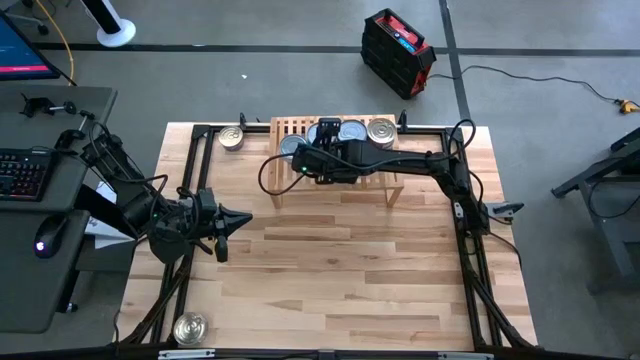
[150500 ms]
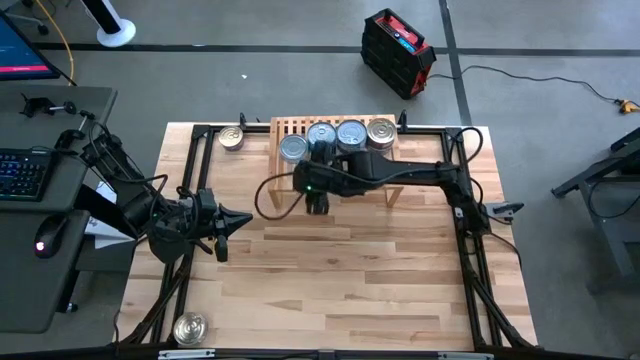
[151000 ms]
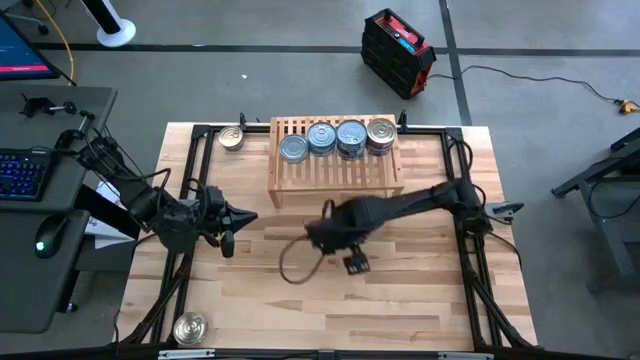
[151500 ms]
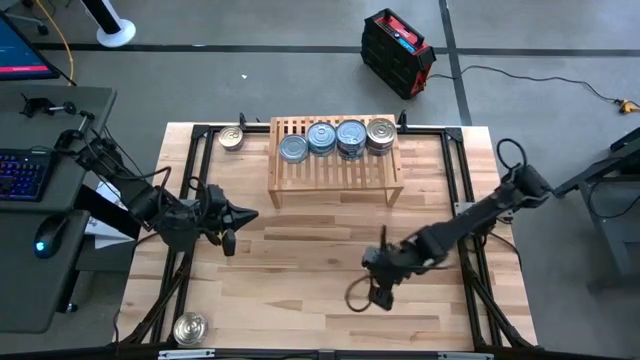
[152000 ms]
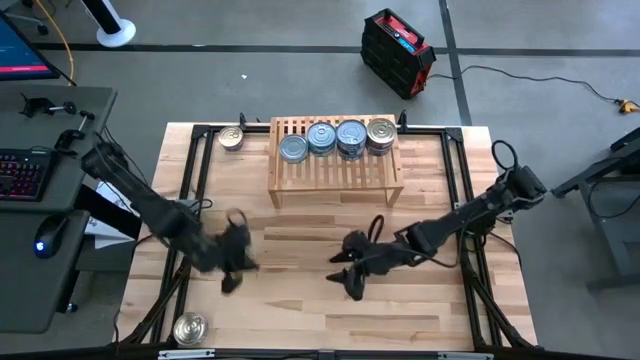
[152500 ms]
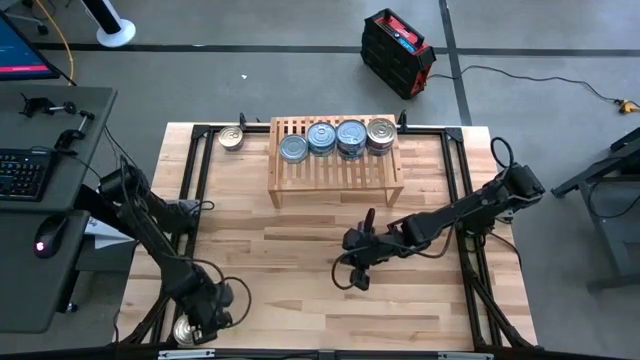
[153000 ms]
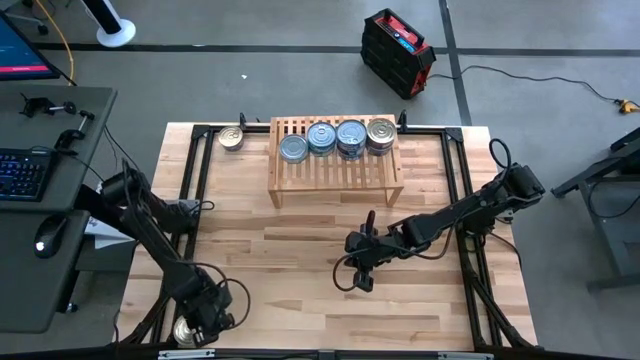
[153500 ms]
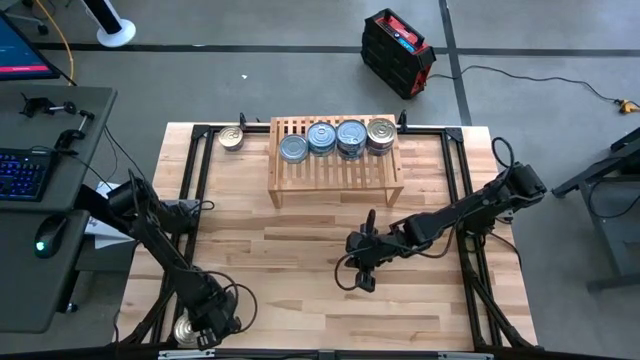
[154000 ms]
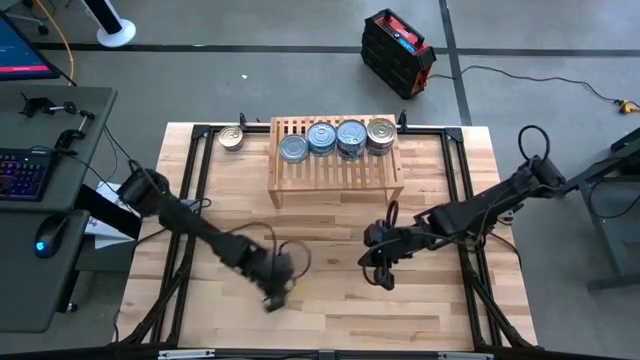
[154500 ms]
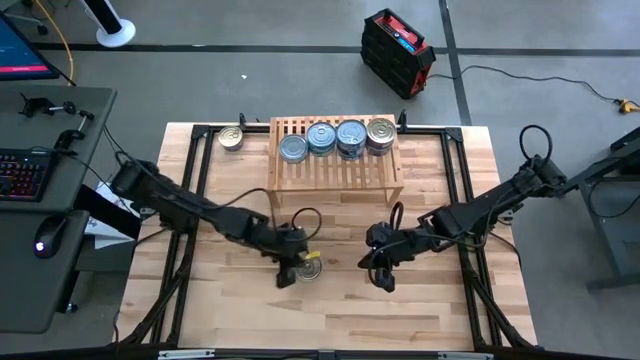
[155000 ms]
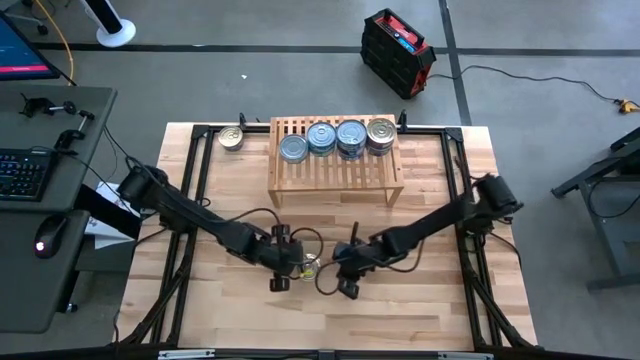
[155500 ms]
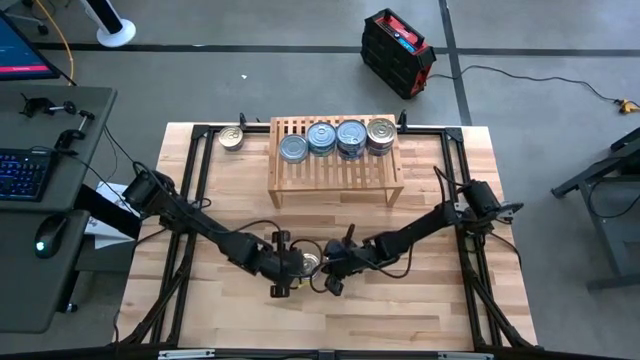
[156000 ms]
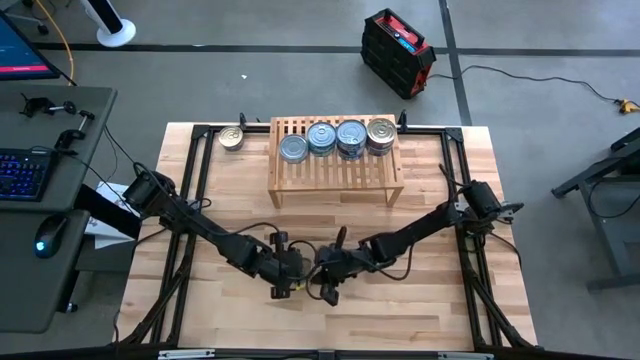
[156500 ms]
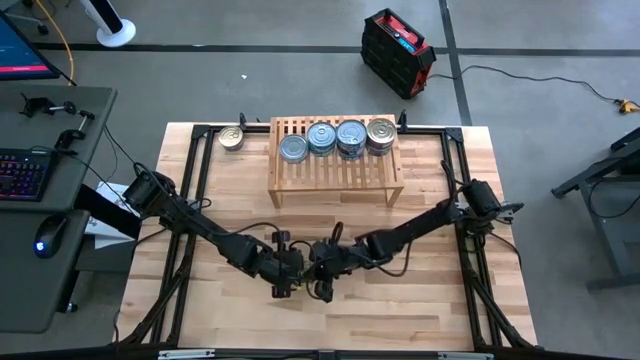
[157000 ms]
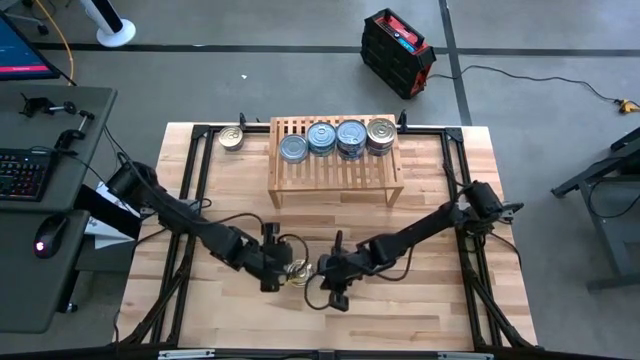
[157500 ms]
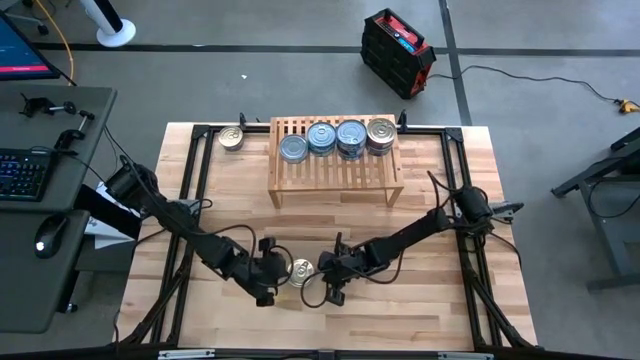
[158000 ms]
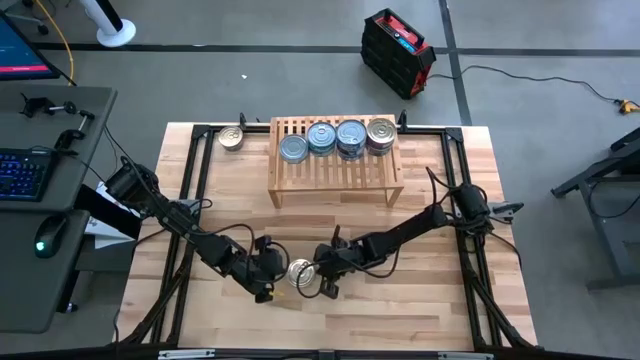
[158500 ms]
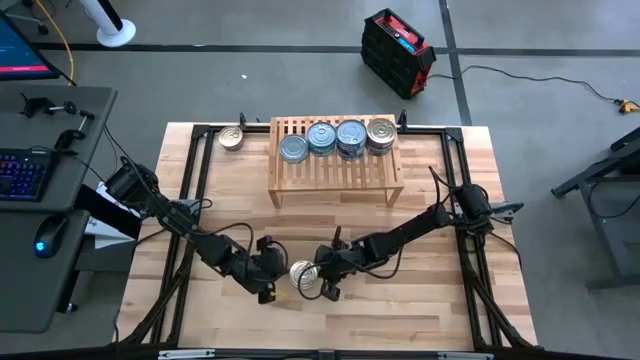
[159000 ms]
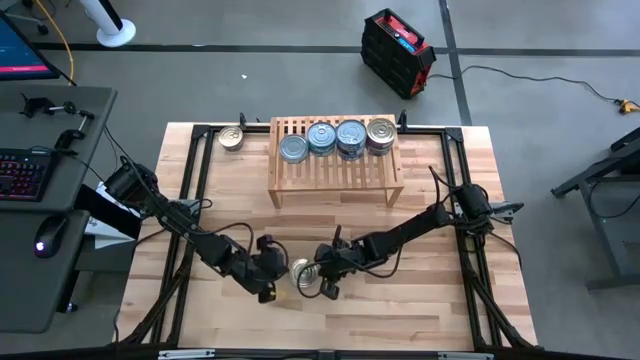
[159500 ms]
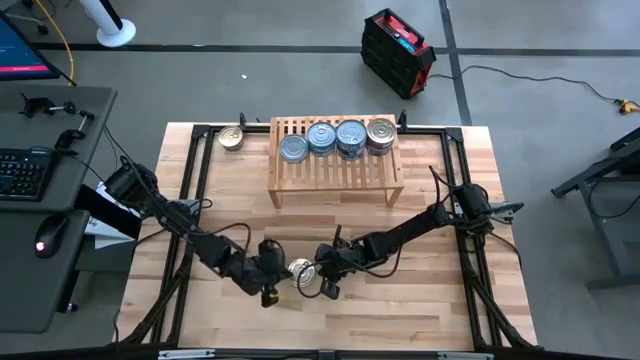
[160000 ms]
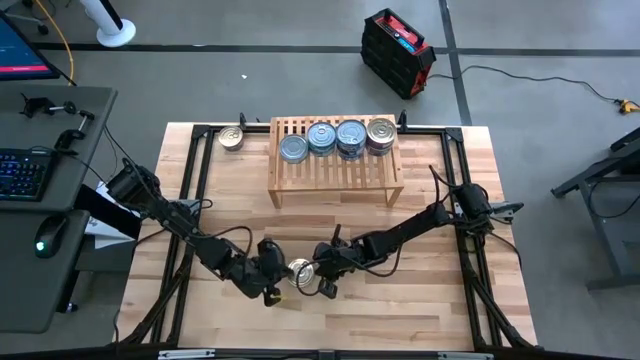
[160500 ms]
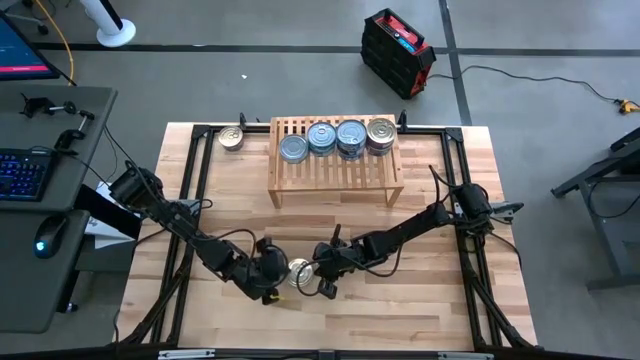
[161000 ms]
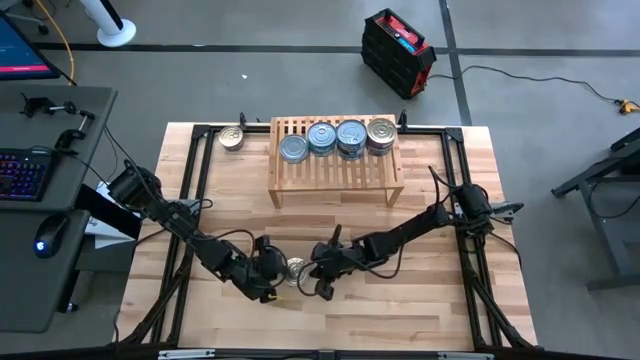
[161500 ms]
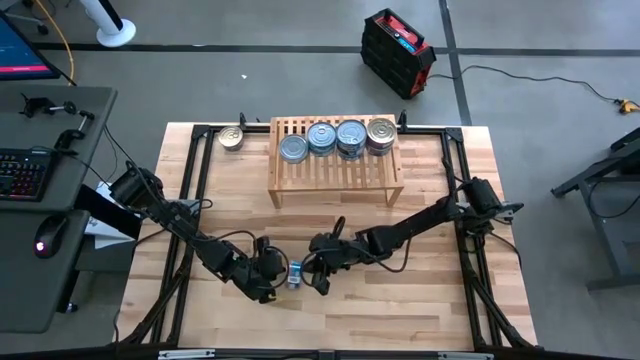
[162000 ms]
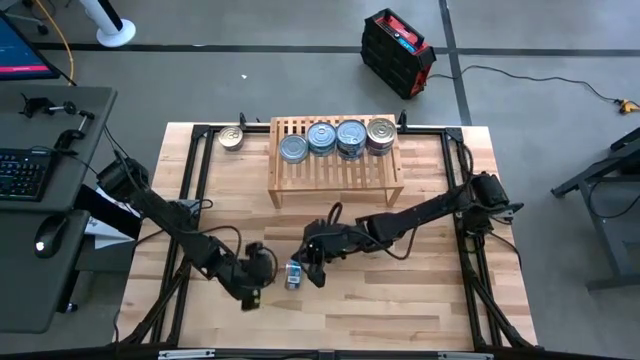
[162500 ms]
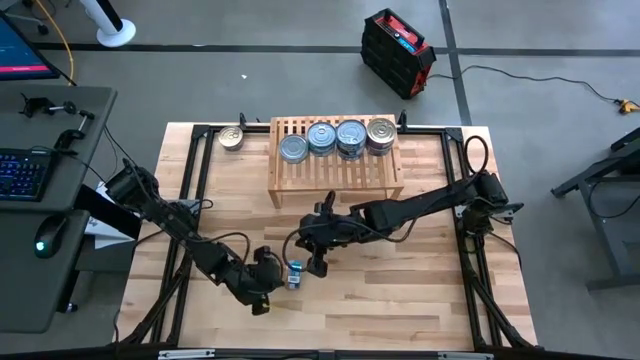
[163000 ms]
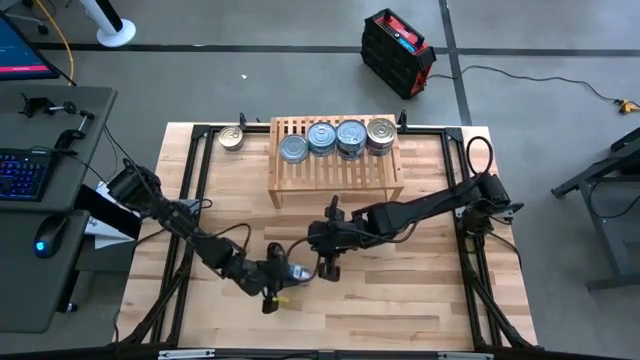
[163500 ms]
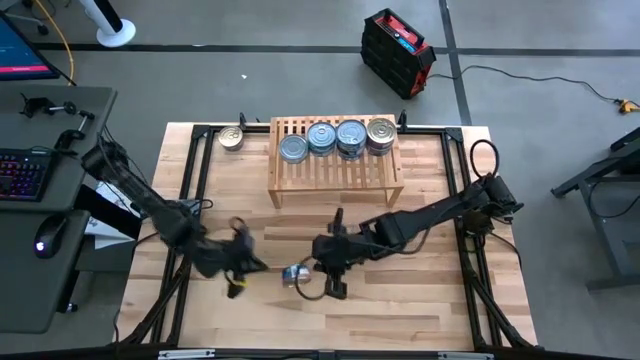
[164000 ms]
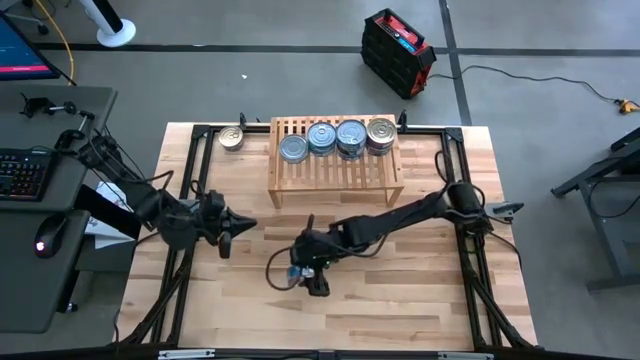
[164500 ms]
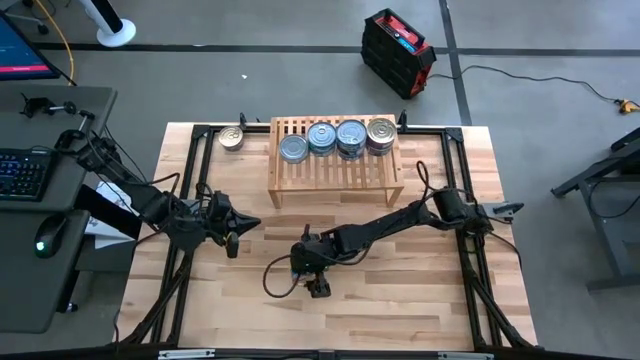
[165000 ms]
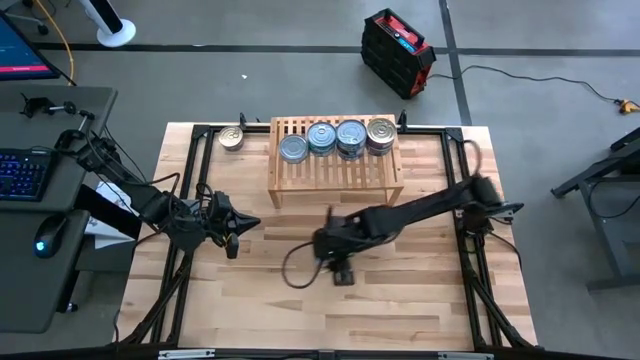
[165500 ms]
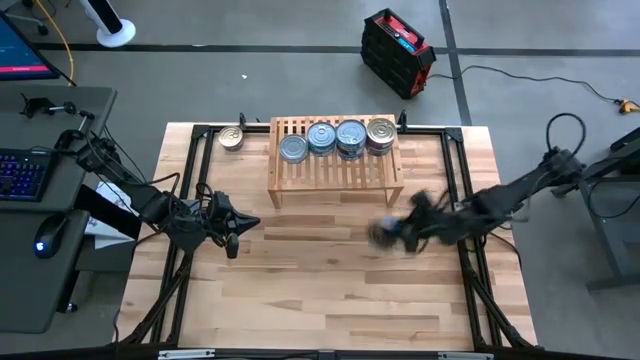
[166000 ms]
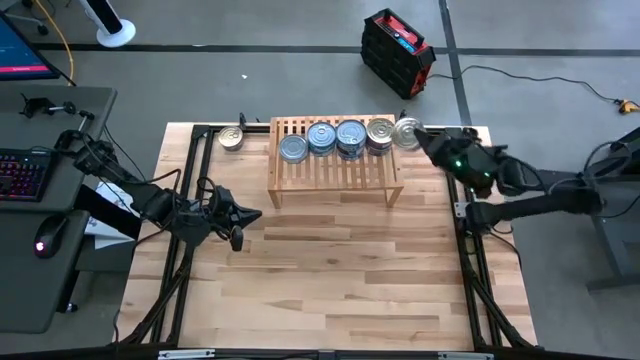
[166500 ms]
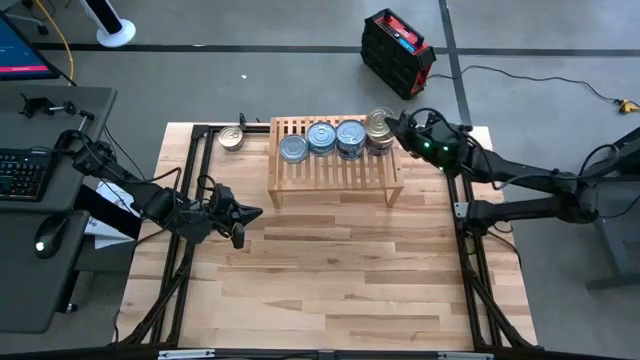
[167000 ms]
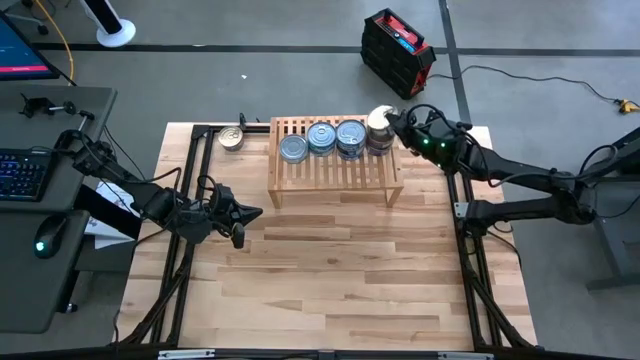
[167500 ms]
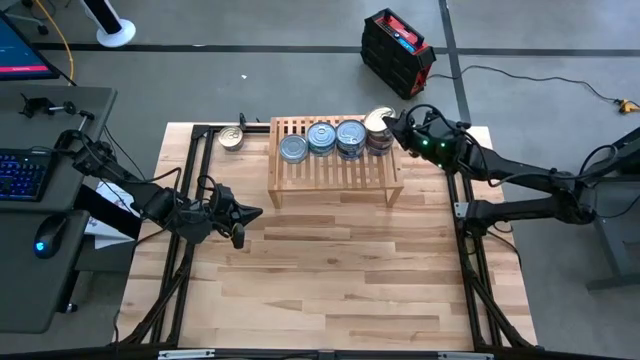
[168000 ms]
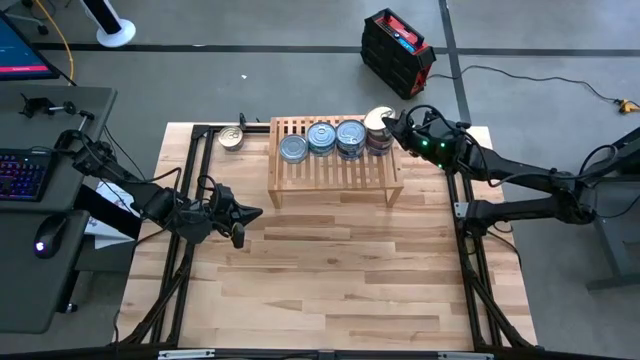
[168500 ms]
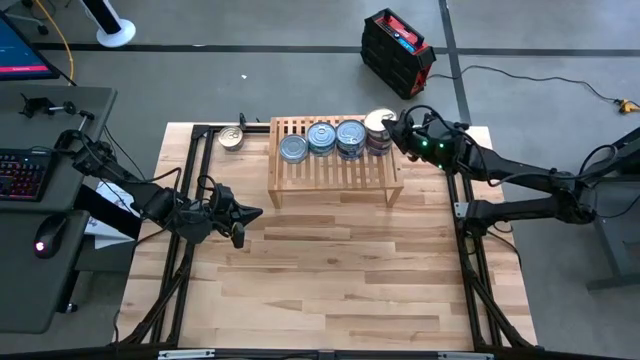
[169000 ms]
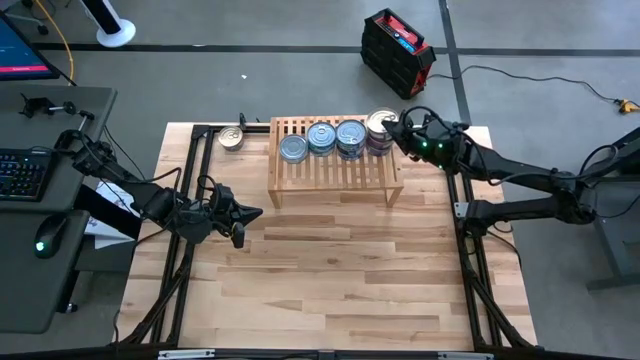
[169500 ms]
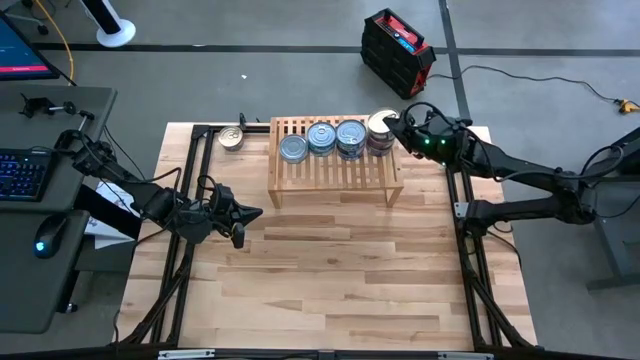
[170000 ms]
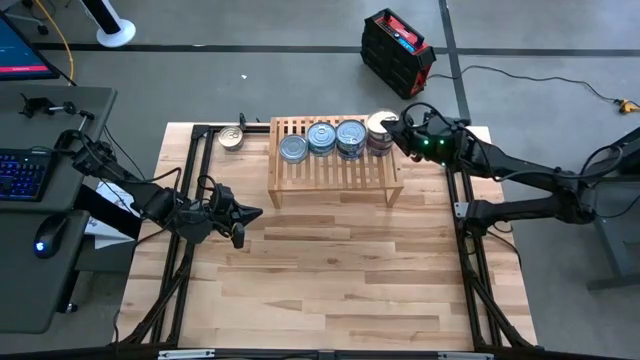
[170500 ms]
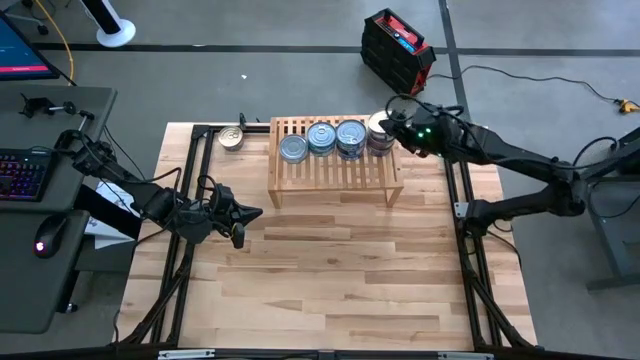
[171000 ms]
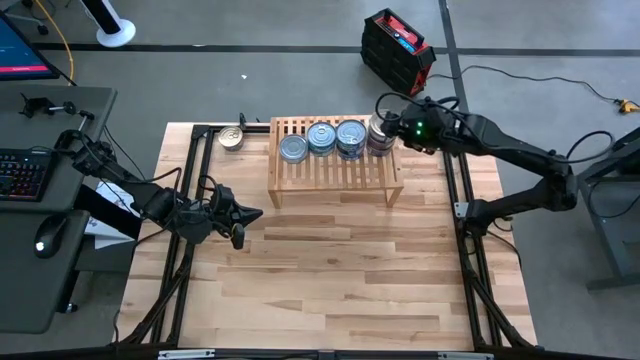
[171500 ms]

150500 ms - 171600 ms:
Task: Stack canned seafood by type on shelf
Stack the pink tuna can on the pink tuna cans on the shelf

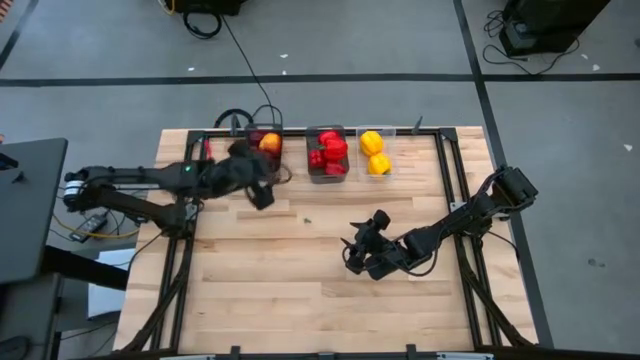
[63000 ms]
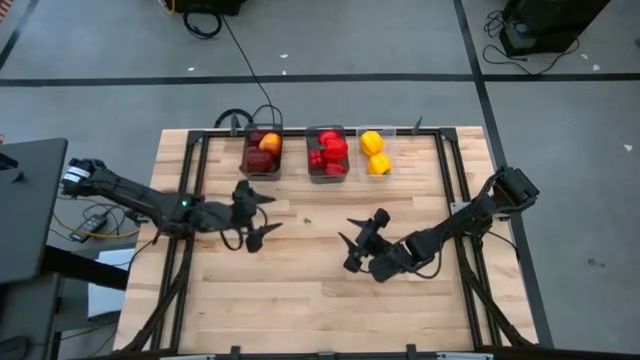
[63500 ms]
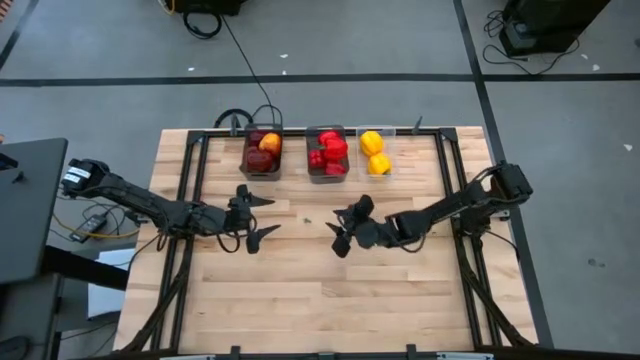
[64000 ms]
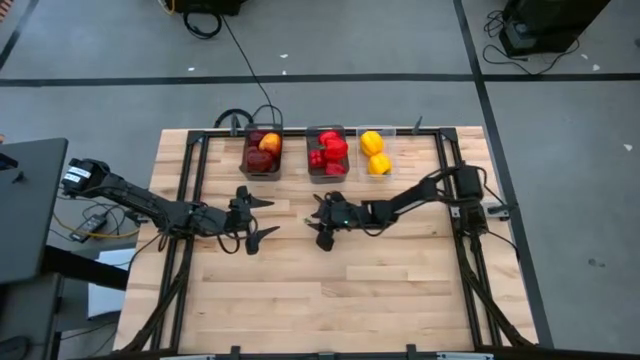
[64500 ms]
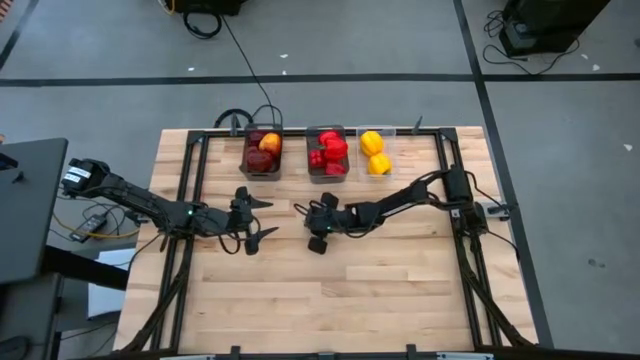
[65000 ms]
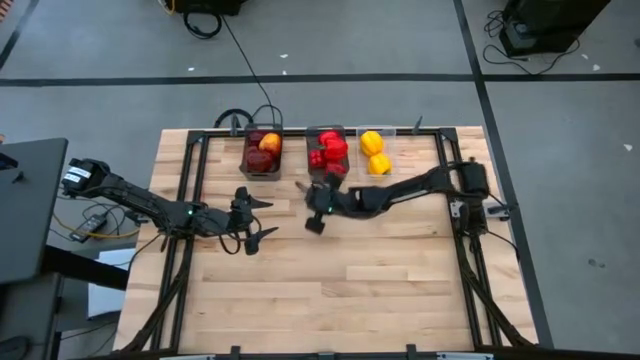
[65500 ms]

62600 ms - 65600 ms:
Task: Sort produce into baskets
Put the green leaf of the red bell pepper into the right black bin
